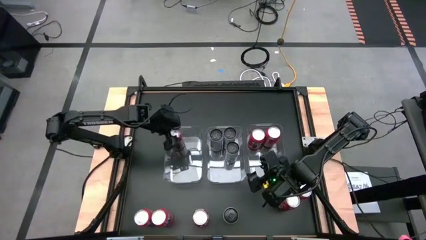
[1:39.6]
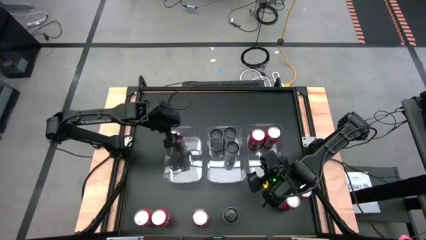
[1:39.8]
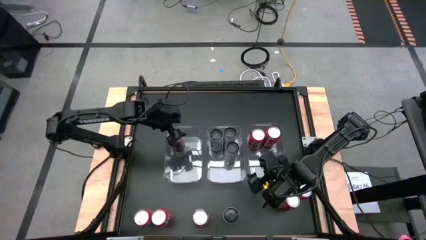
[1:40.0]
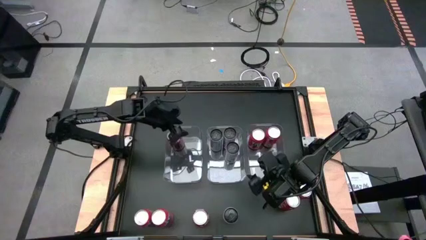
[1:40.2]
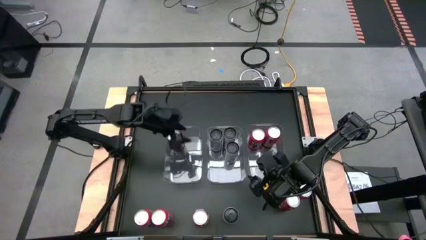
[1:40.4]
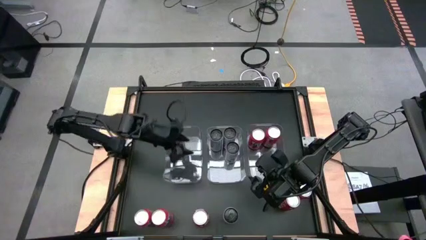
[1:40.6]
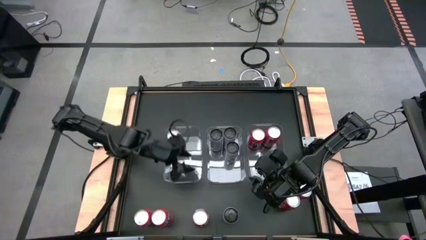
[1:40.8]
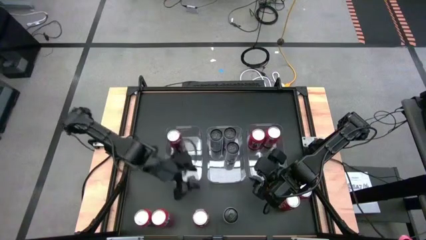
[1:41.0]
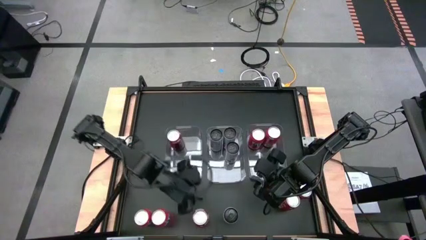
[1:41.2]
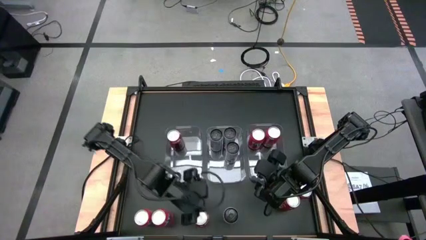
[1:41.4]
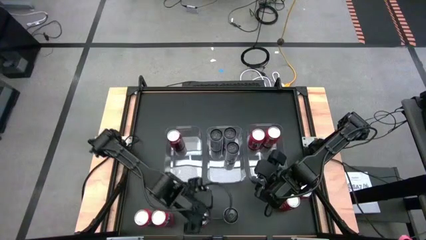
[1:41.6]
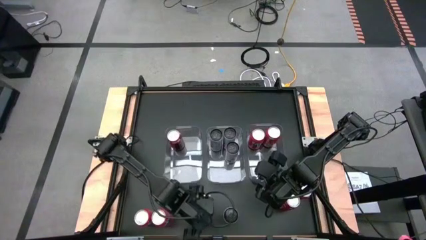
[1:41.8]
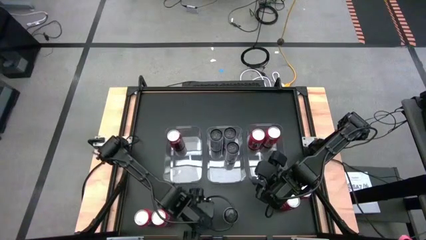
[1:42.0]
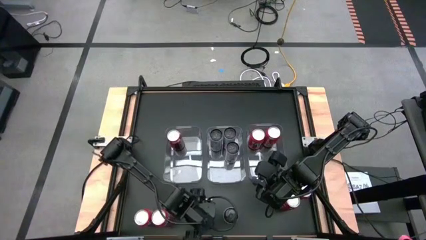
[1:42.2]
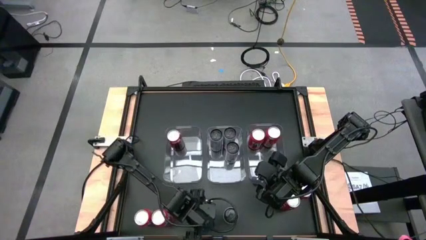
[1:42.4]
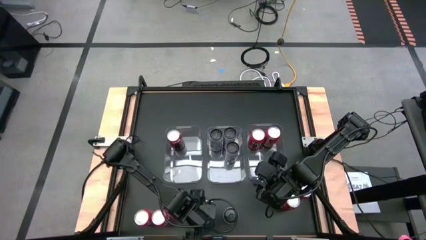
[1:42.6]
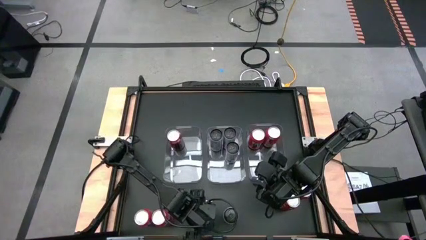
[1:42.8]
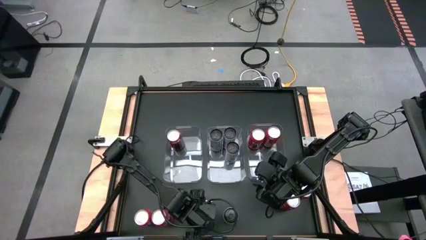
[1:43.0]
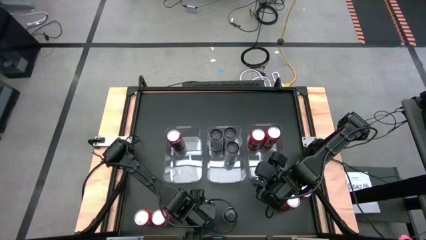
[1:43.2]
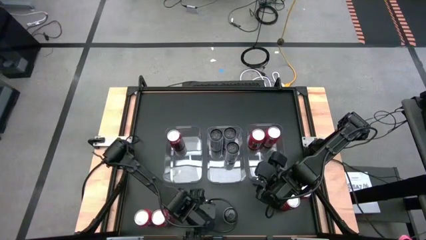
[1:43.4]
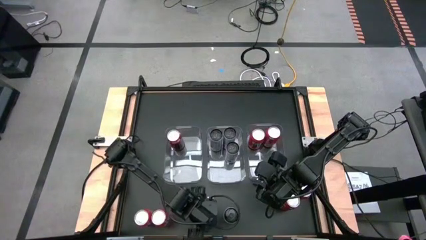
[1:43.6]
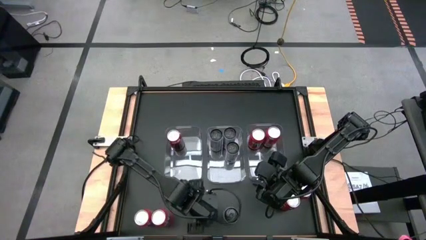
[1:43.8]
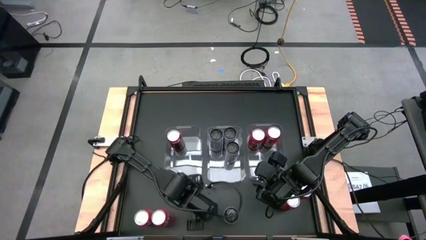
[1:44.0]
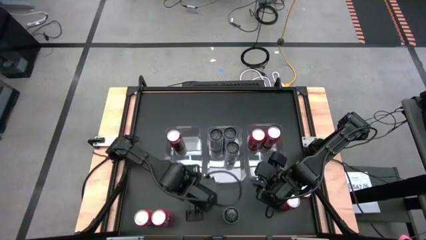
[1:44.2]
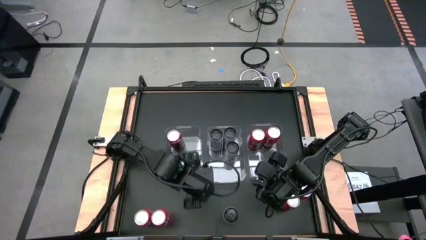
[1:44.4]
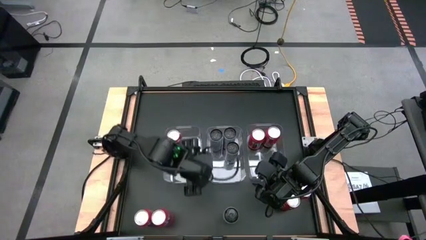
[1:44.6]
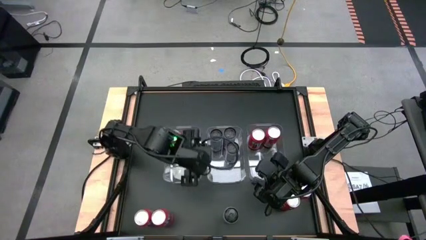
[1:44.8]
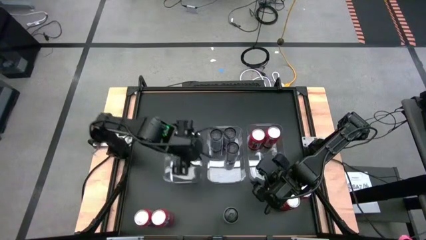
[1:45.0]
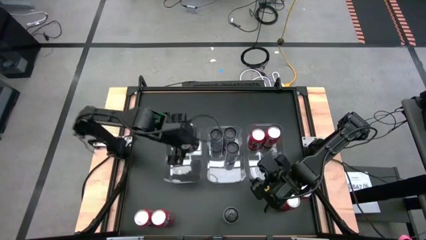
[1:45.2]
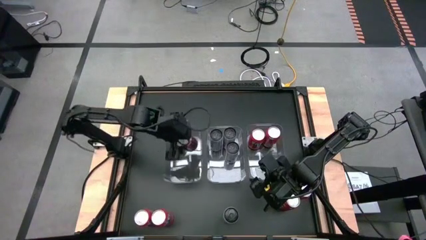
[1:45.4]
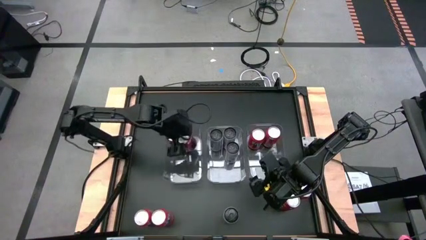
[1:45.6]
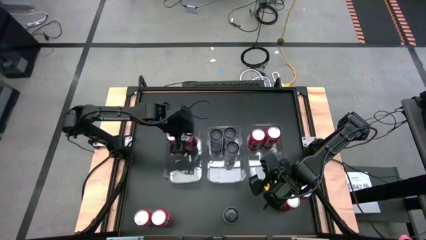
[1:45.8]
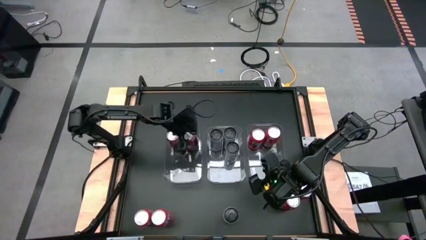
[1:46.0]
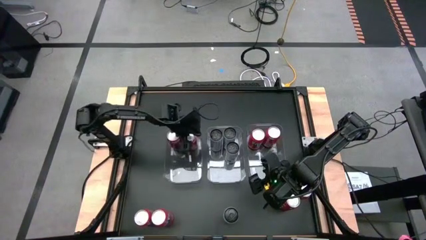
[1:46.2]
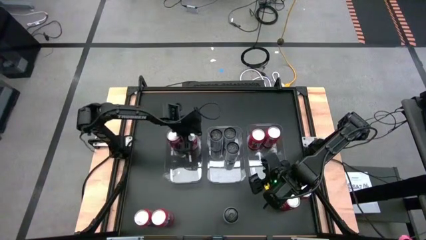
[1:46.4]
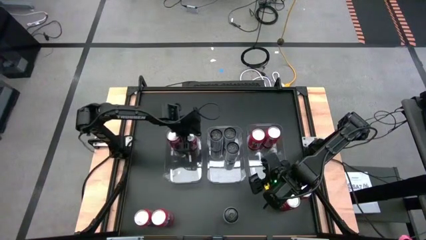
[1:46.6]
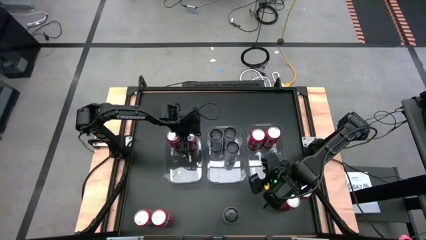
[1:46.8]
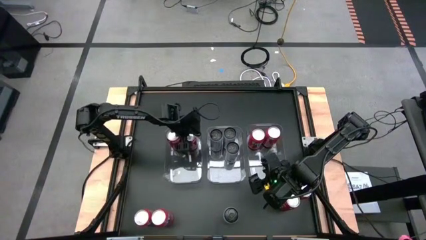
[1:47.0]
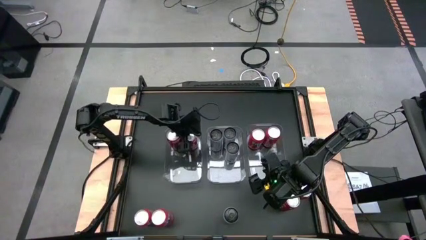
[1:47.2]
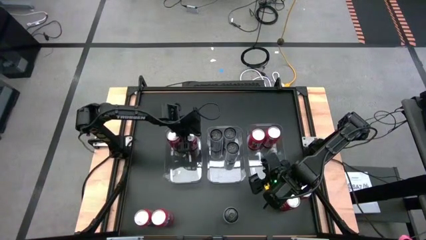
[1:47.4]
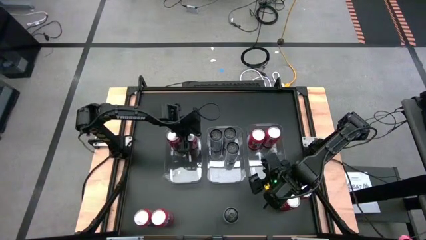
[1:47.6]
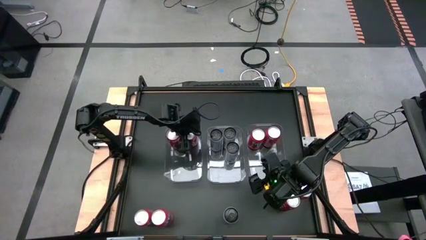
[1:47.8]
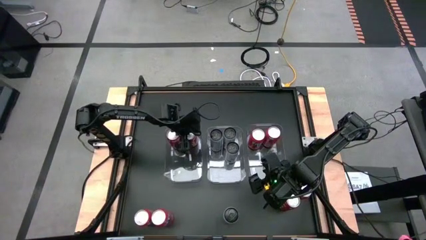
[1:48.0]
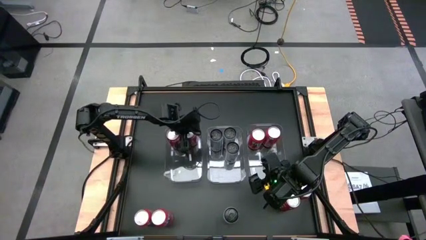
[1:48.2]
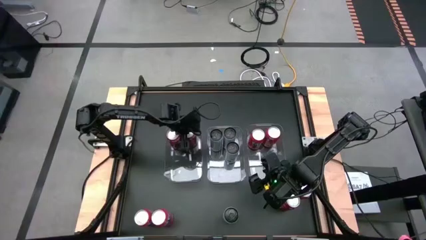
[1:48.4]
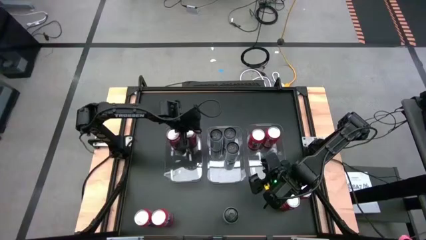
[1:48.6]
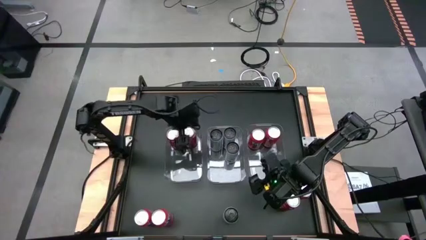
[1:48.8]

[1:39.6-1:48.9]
Task: Sort soda cans
Put the left red soda can into the left transparent bin

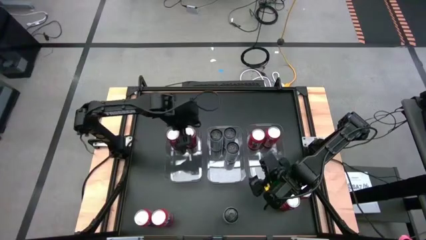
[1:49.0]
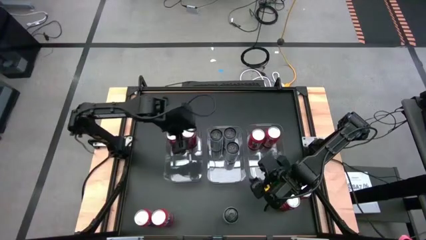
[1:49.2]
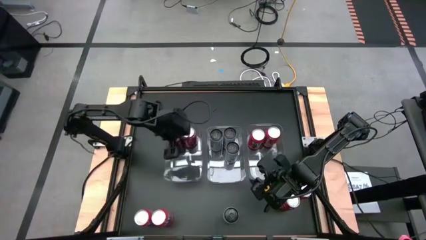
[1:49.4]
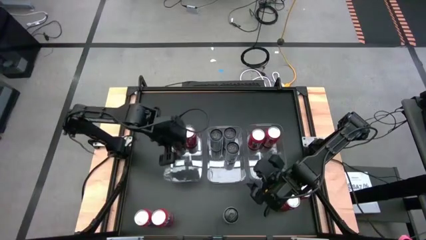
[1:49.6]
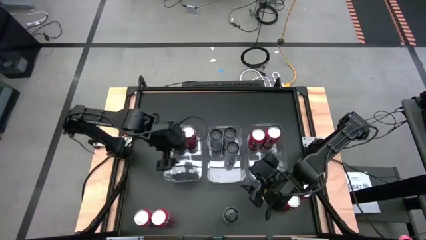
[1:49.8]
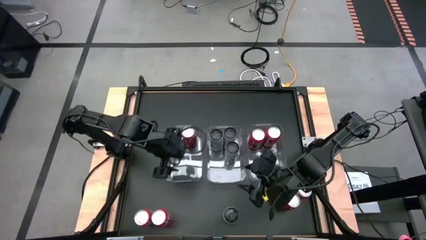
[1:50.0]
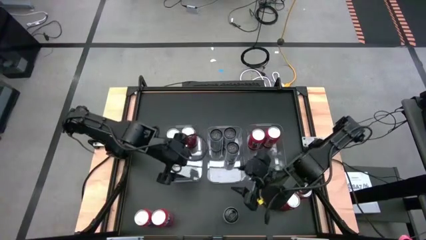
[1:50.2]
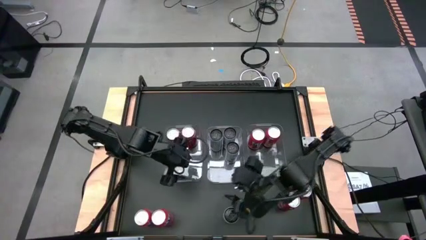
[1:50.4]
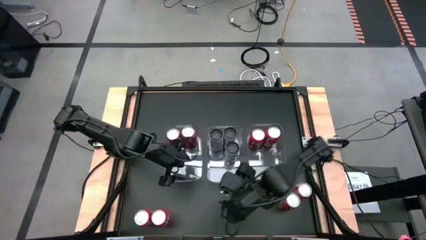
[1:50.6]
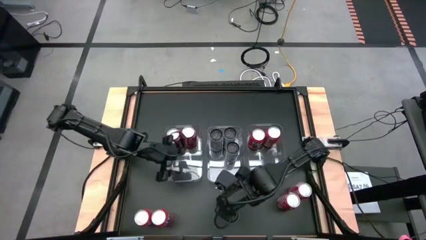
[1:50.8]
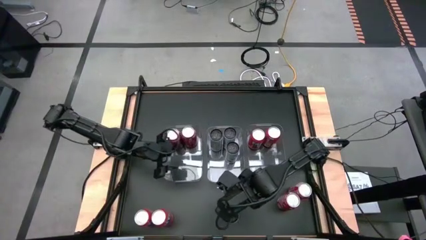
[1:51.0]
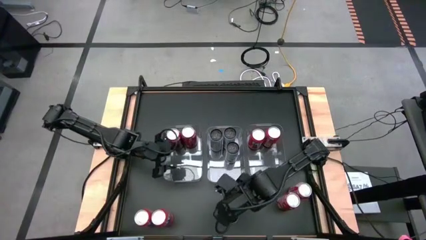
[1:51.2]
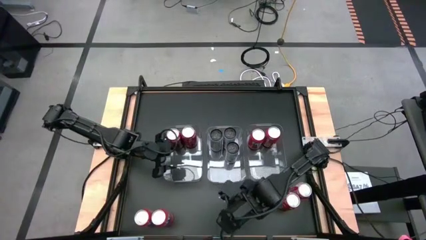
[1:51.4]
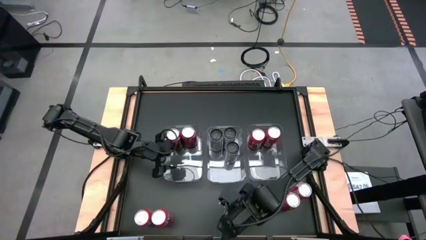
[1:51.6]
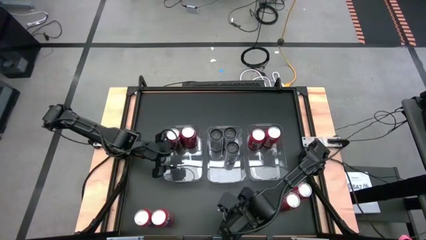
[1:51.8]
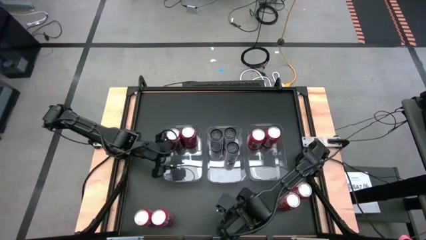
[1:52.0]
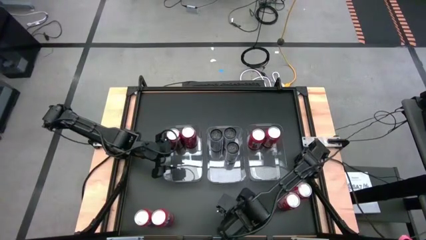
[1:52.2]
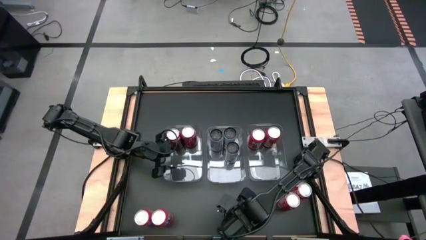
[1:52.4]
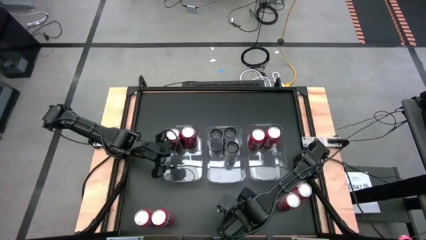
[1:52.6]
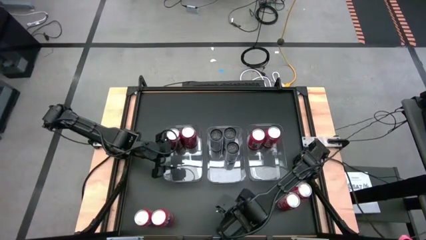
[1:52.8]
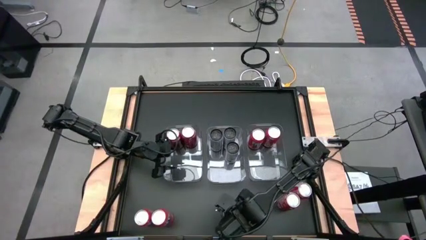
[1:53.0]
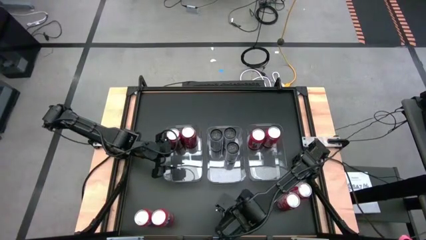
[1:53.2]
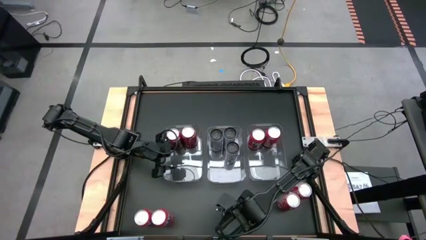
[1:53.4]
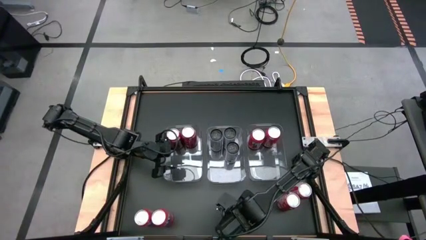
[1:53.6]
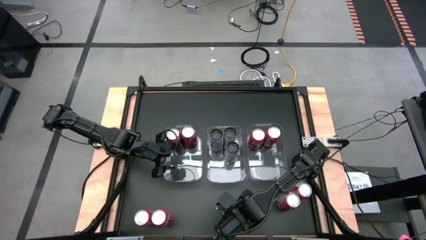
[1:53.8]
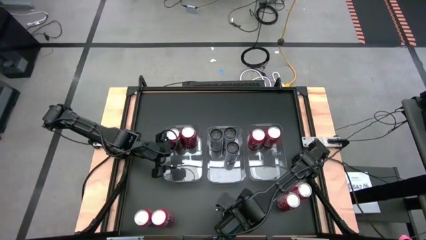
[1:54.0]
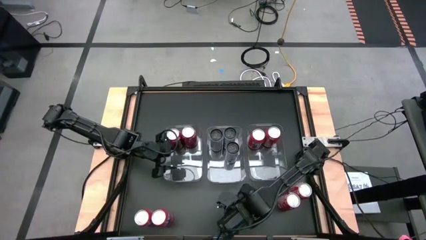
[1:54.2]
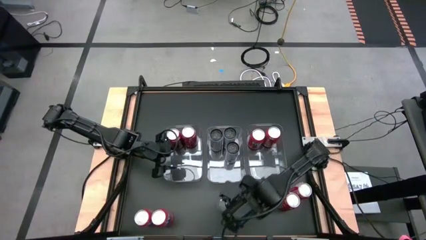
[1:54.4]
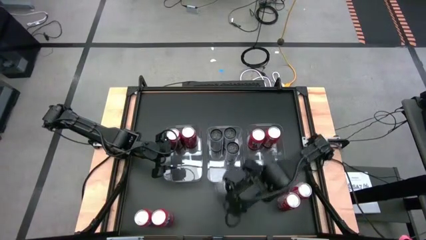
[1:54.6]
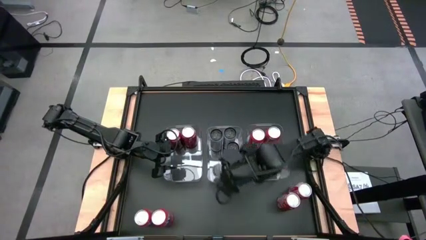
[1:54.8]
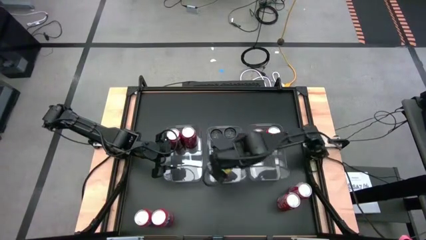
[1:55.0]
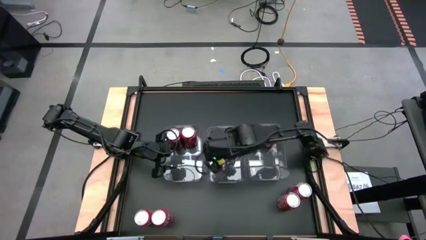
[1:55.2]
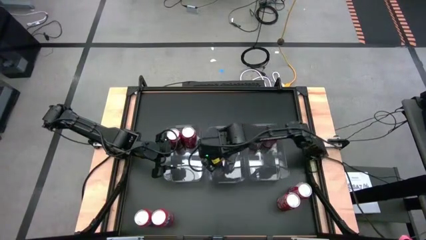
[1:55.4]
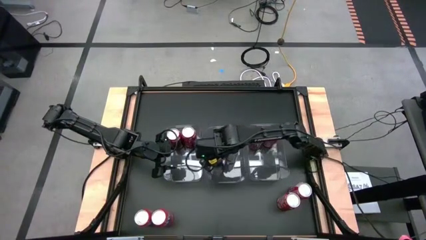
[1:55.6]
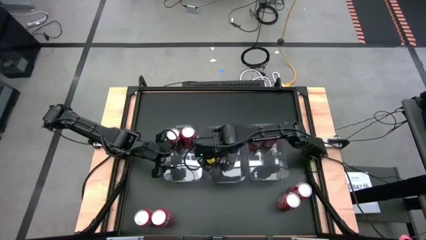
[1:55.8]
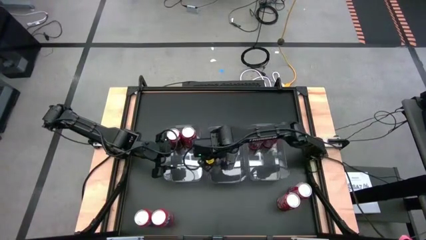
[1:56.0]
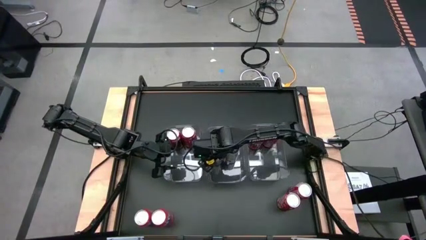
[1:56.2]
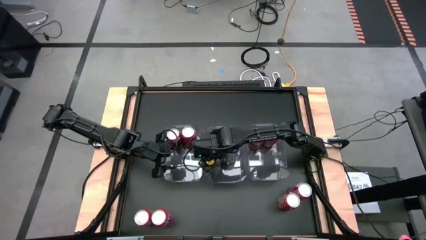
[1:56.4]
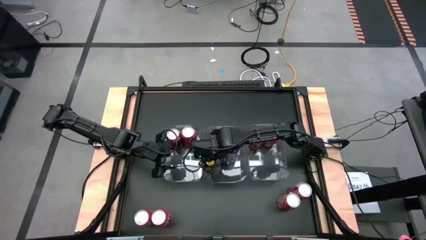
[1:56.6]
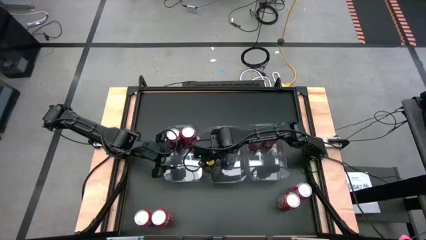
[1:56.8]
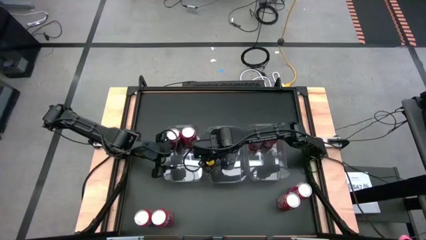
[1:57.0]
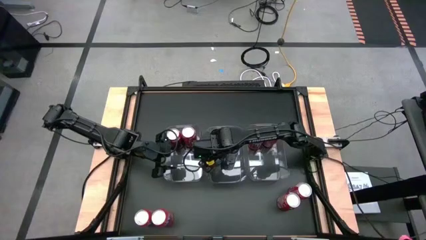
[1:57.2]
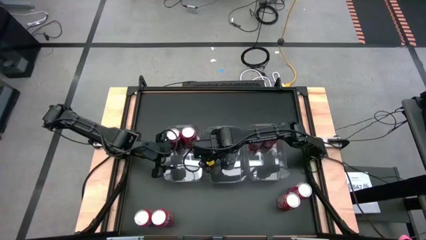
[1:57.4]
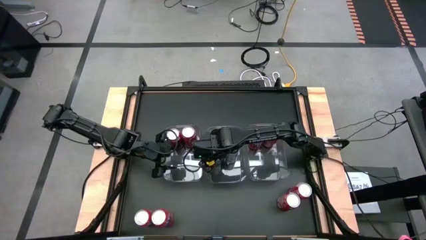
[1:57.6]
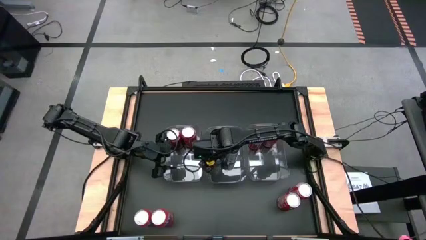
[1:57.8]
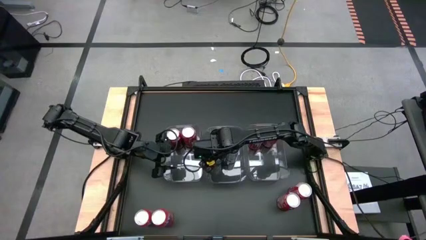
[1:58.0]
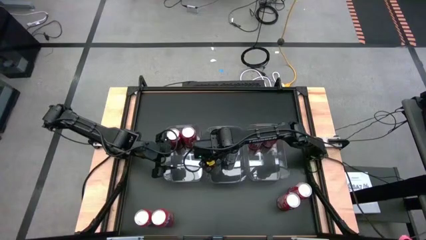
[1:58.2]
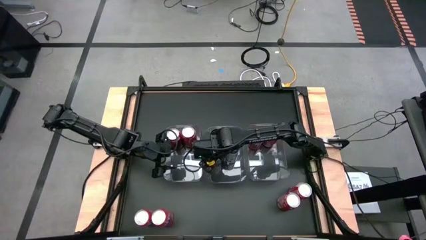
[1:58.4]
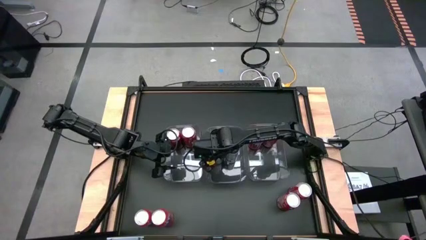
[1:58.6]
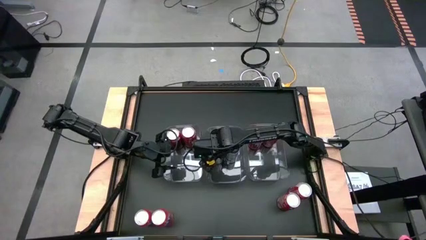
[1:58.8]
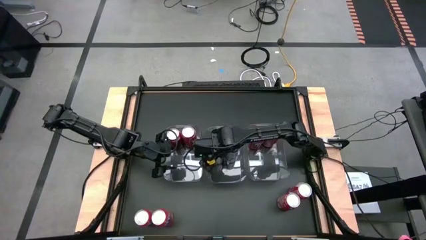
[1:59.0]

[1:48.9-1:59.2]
Put the white soda can into the center transparent bin
